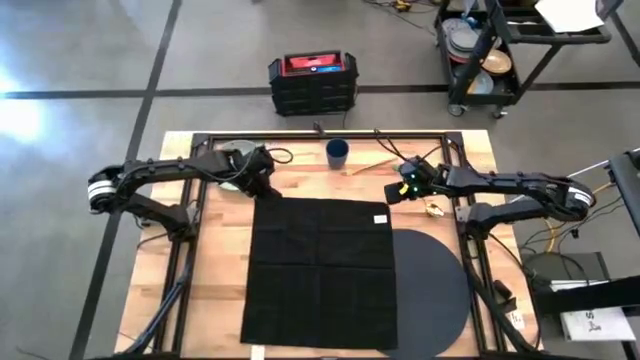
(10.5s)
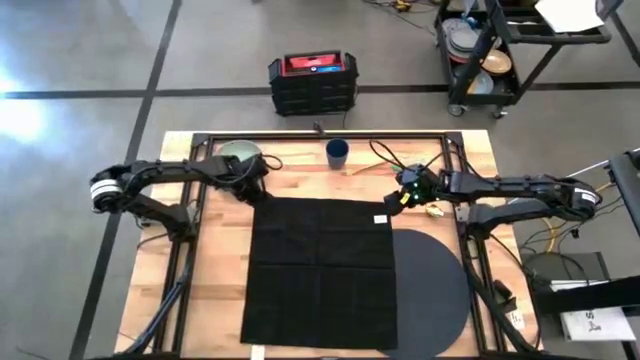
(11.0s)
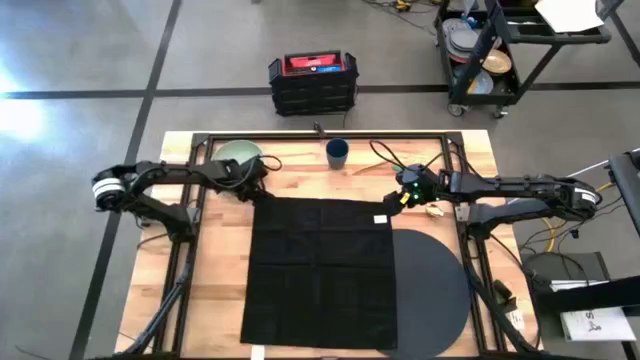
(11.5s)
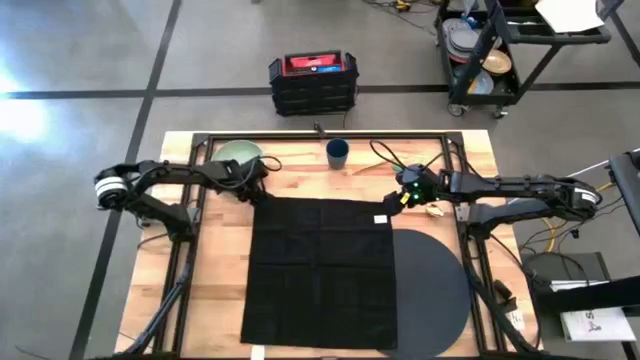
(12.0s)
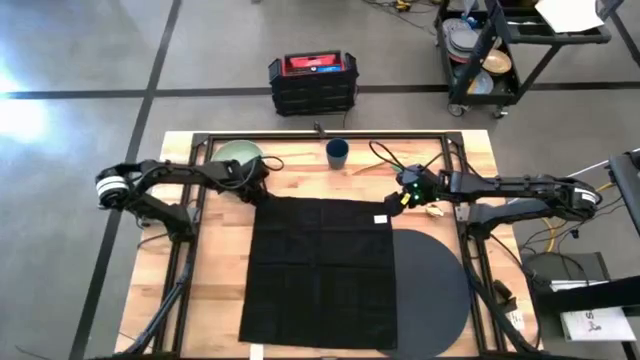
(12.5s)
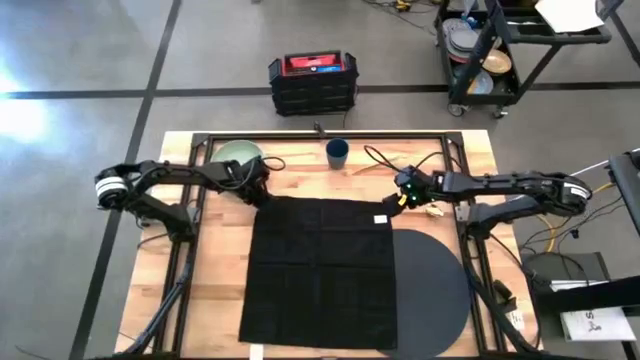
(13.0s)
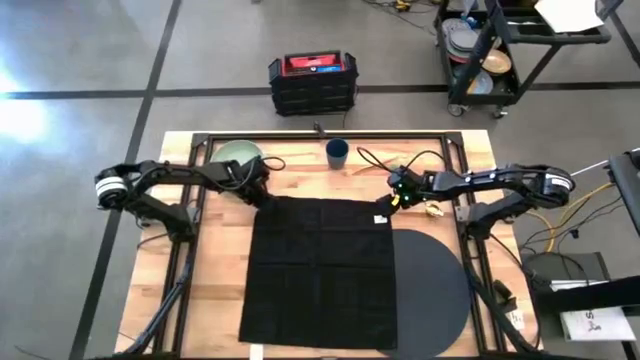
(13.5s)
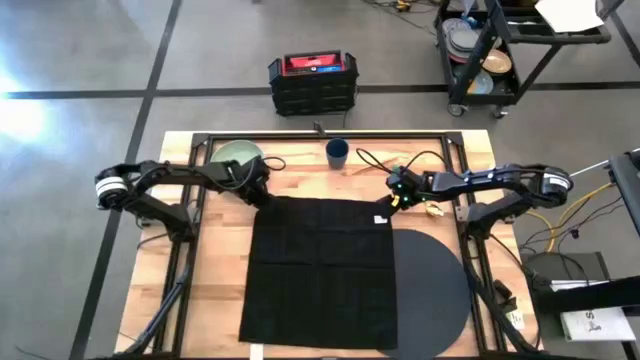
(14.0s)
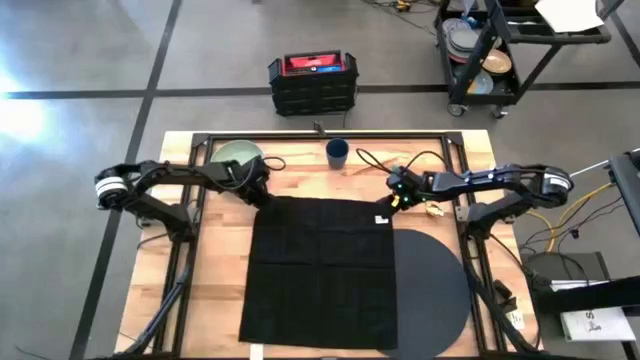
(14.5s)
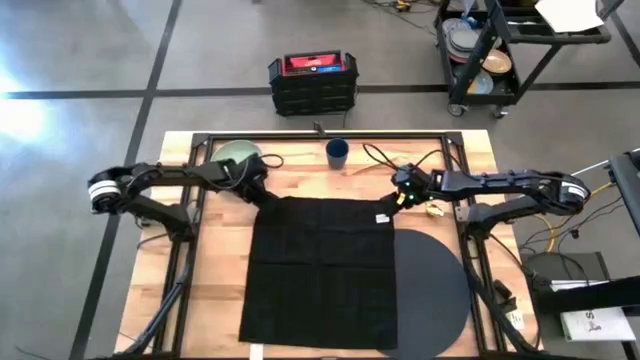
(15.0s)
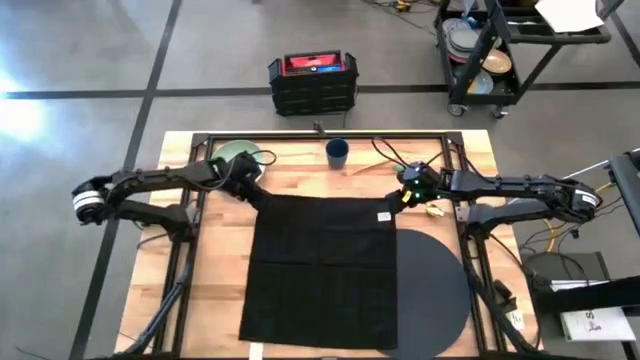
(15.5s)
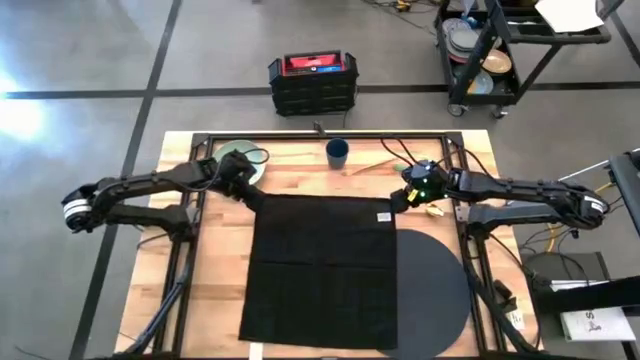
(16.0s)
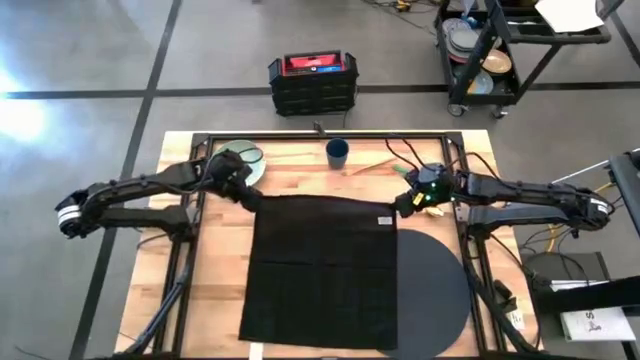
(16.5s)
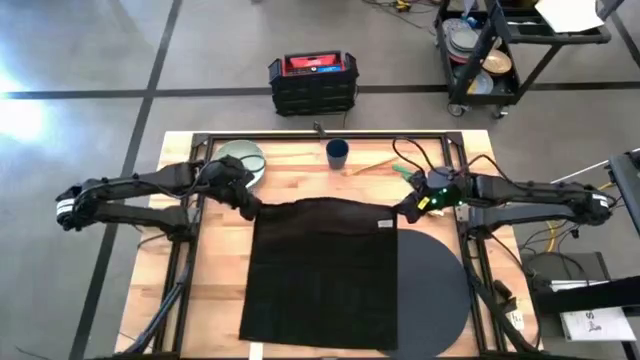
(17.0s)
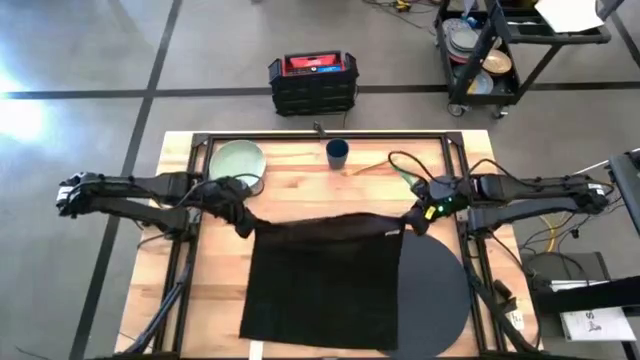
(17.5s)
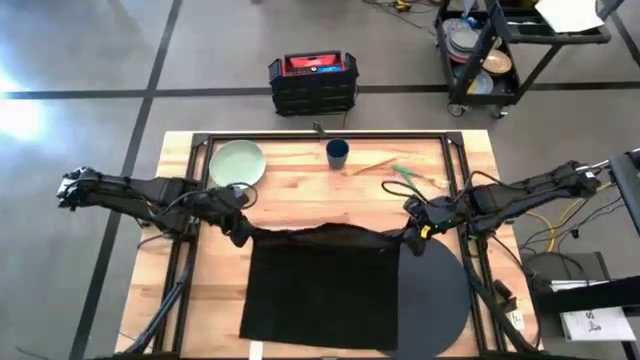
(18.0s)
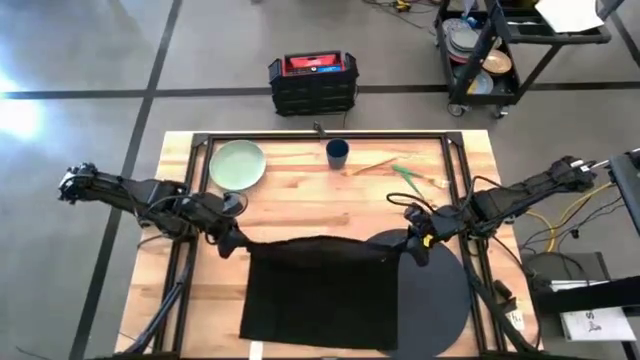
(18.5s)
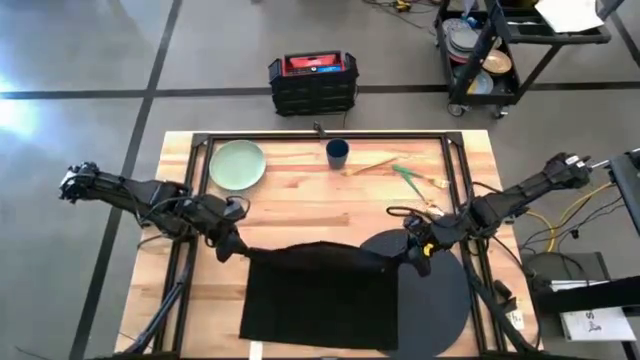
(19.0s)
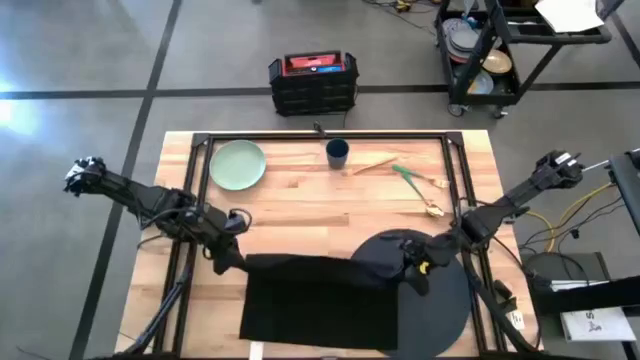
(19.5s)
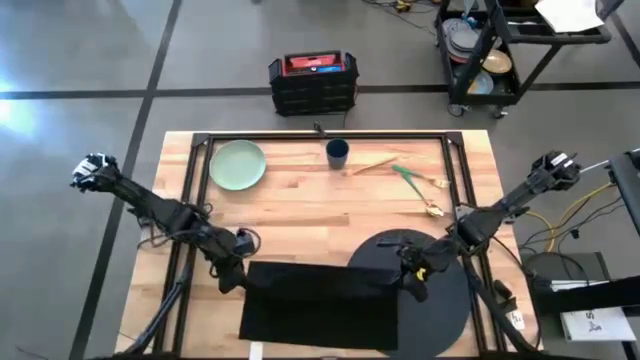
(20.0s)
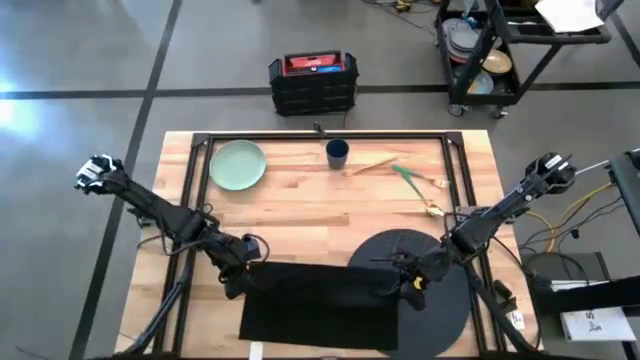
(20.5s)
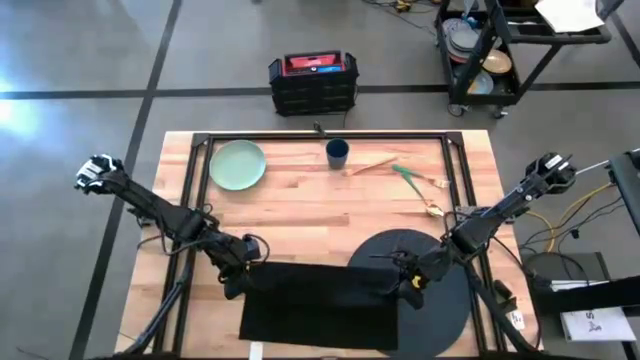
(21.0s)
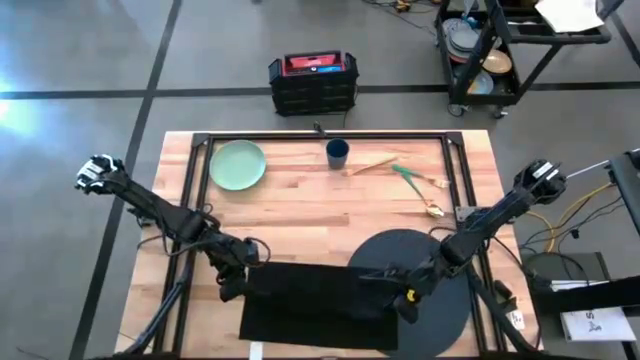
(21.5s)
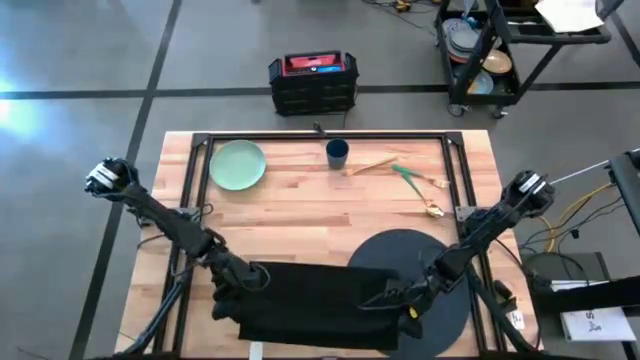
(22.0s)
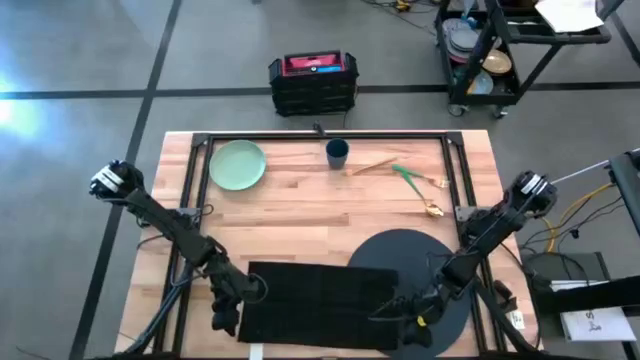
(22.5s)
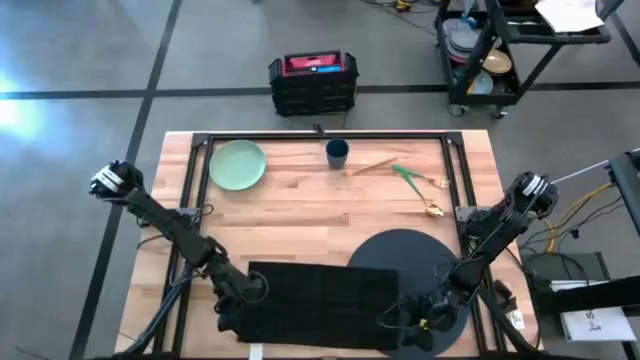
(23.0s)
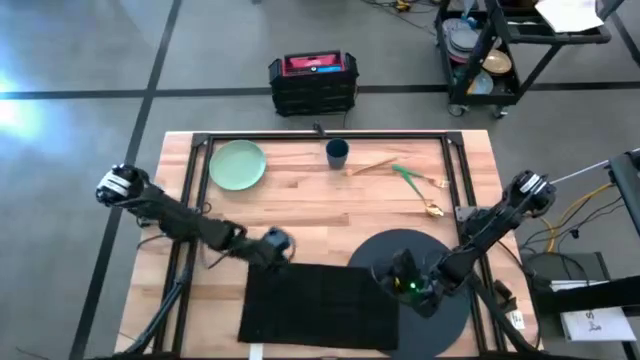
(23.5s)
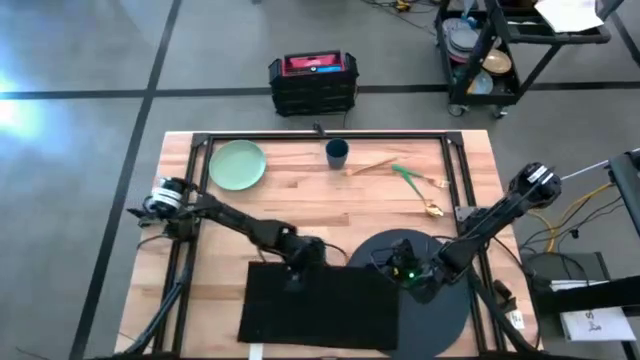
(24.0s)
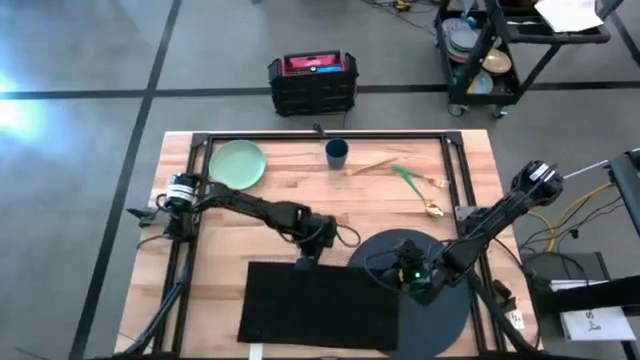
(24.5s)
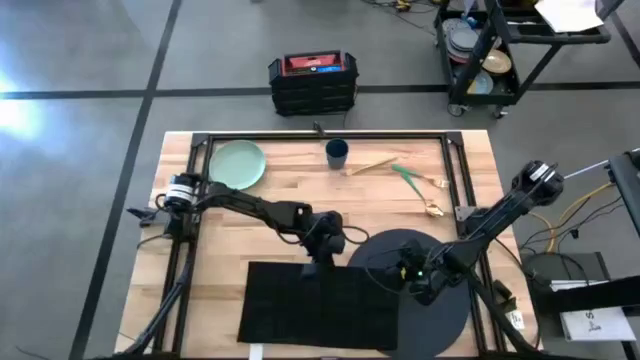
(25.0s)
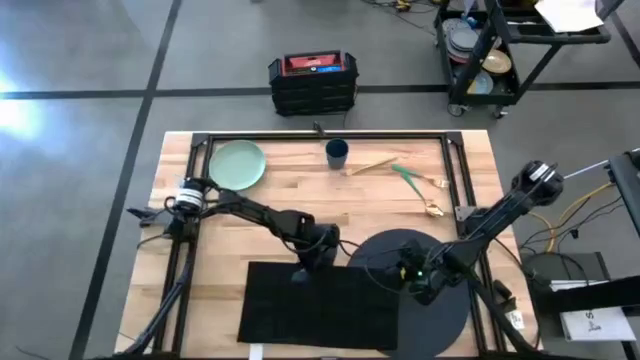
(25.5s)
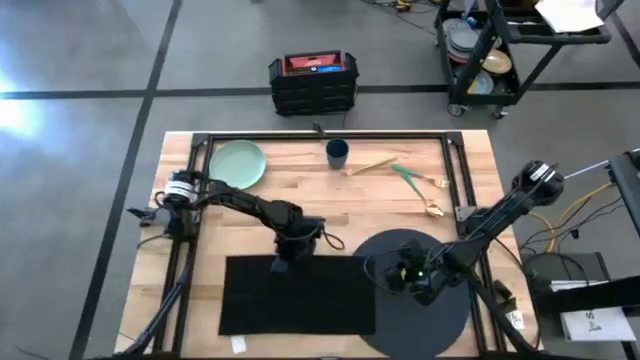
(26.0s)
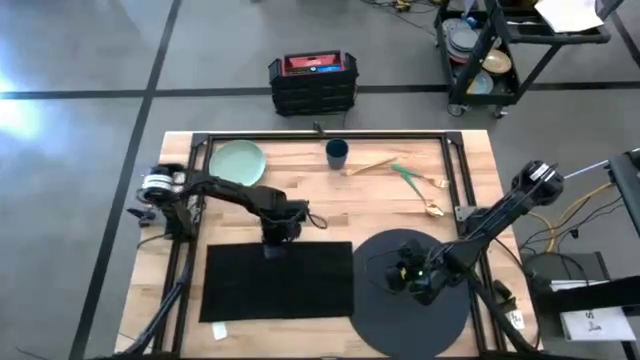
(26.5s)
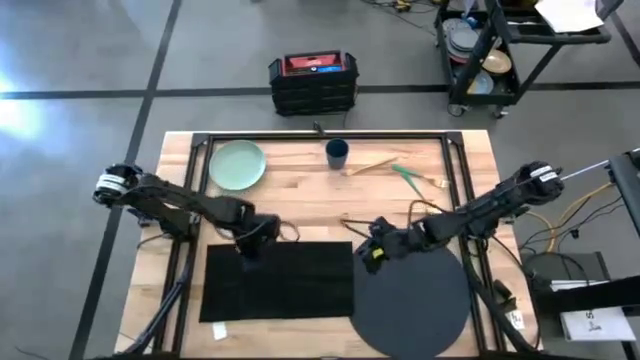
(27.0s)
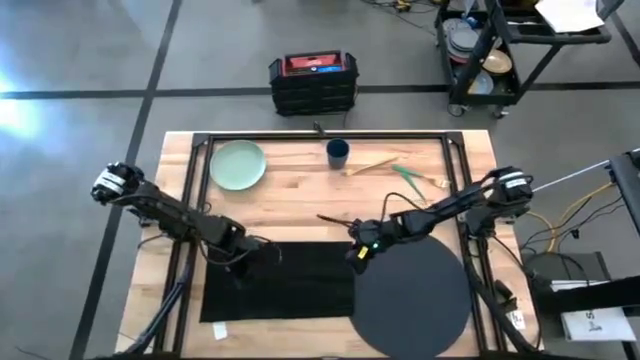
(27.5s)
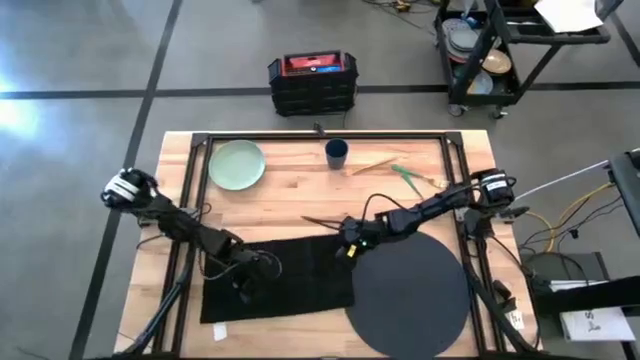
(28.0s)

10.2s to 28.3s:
Task: Set table place
Fold the black table napkin
